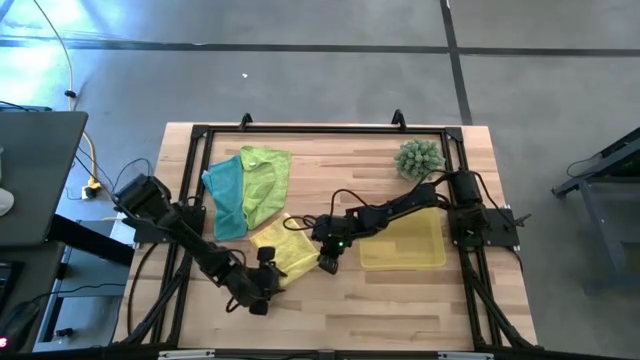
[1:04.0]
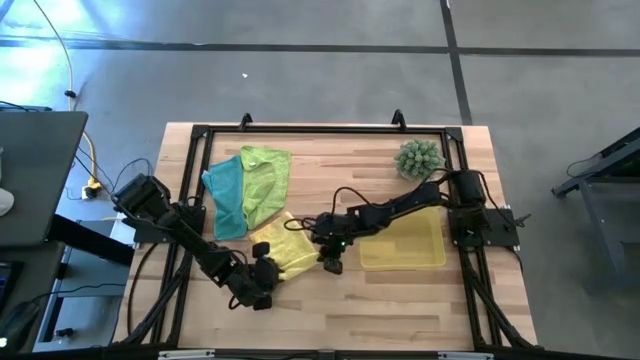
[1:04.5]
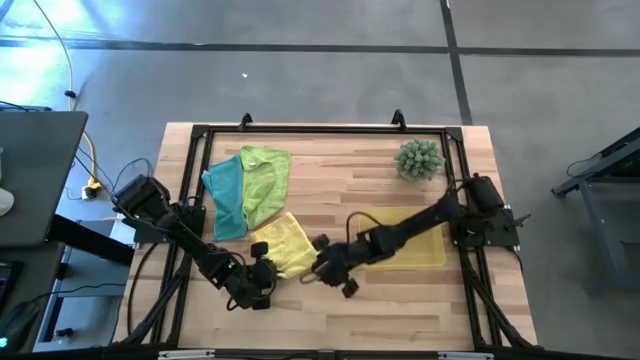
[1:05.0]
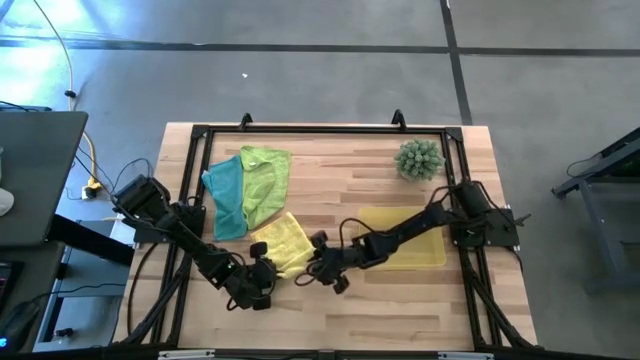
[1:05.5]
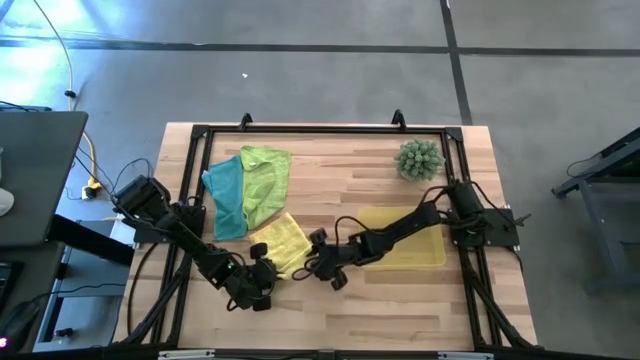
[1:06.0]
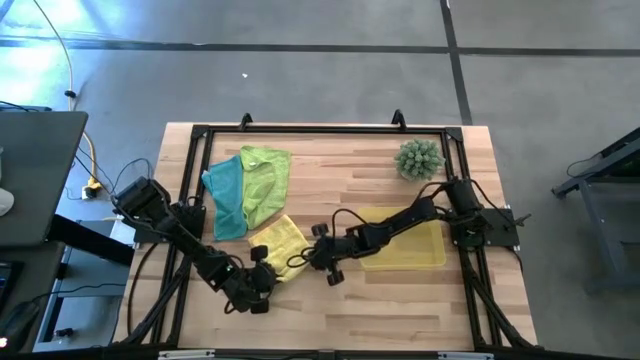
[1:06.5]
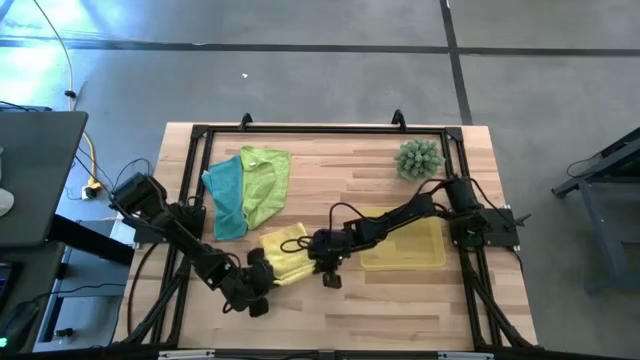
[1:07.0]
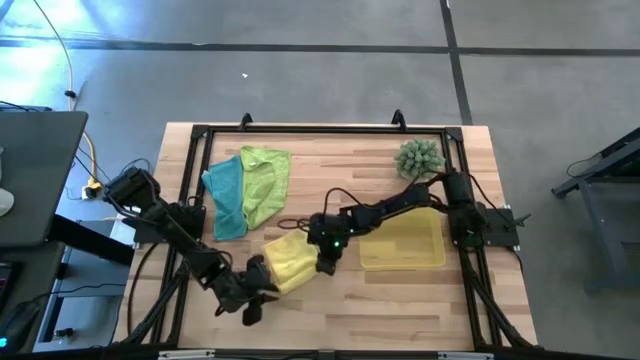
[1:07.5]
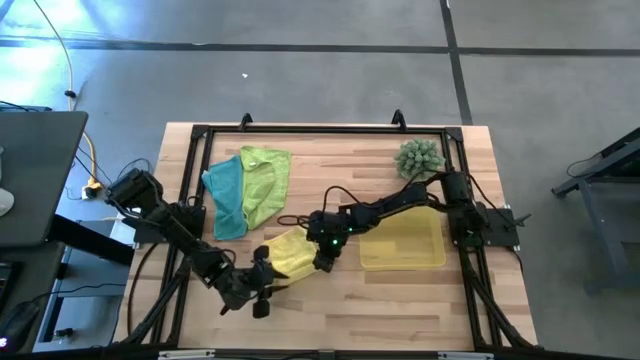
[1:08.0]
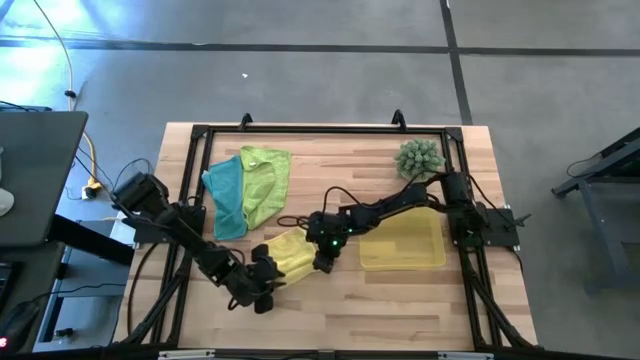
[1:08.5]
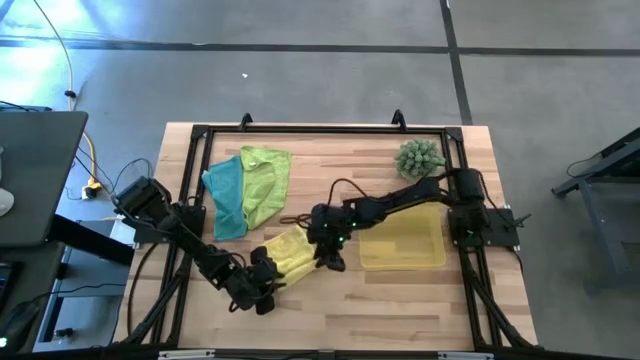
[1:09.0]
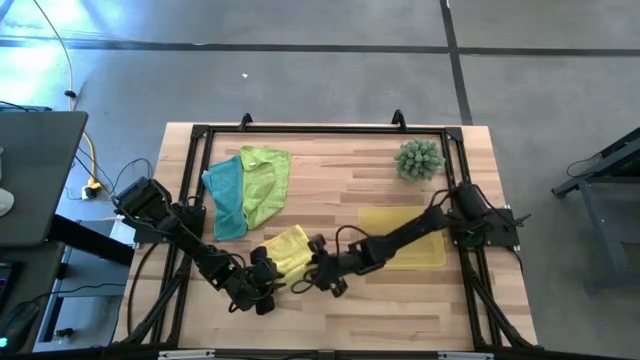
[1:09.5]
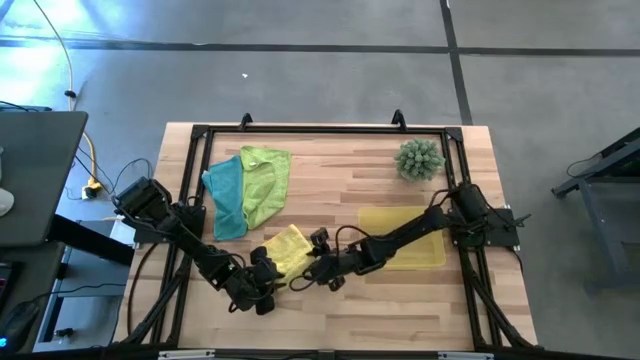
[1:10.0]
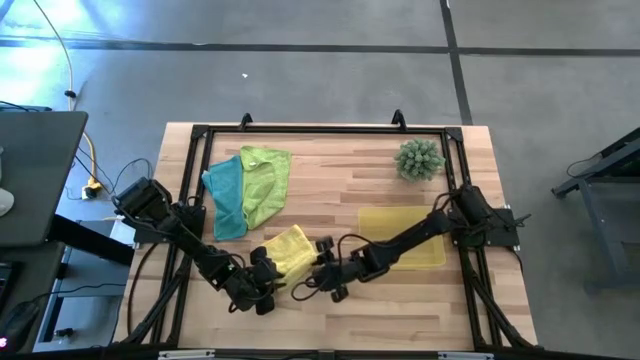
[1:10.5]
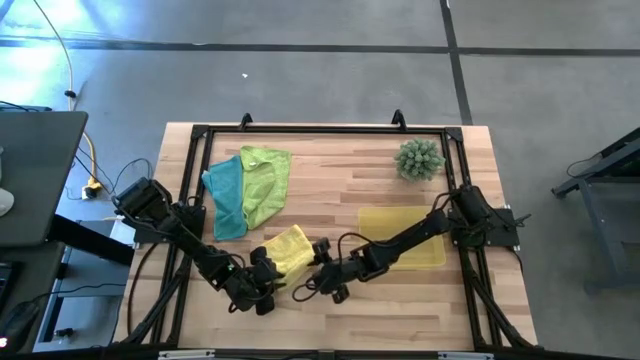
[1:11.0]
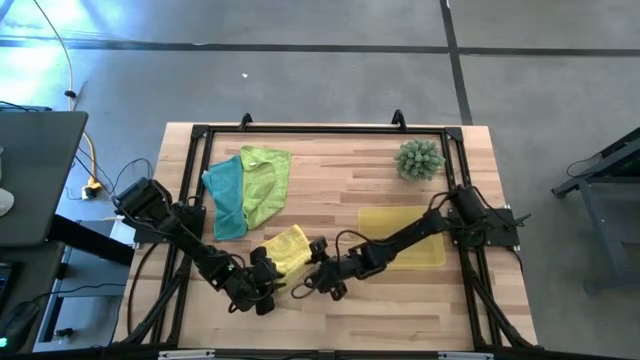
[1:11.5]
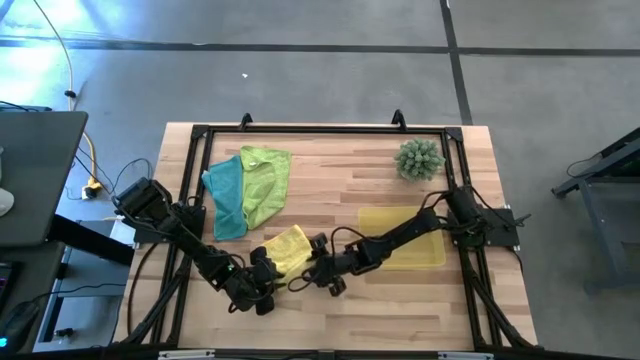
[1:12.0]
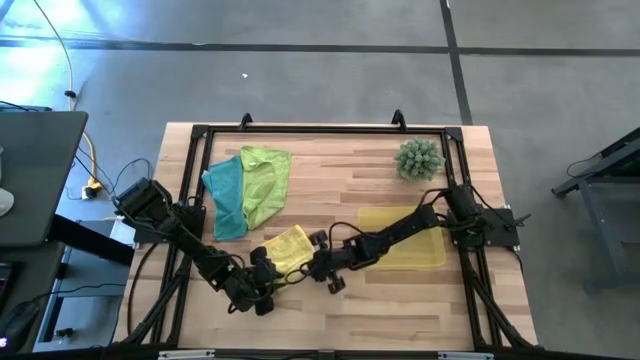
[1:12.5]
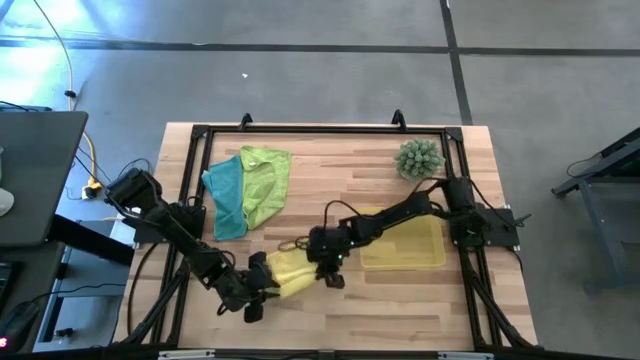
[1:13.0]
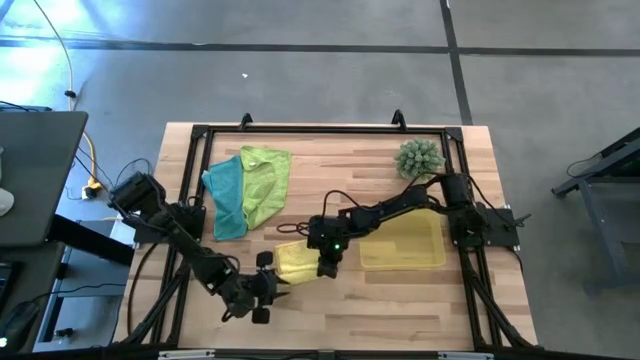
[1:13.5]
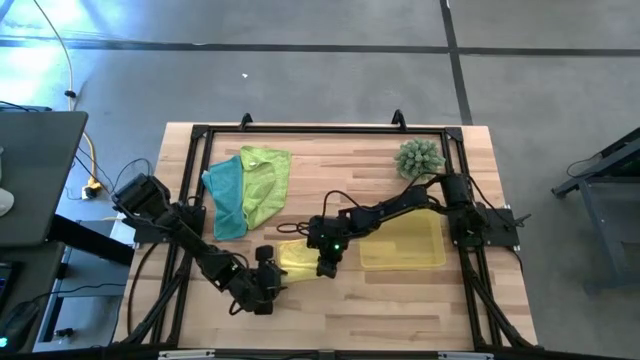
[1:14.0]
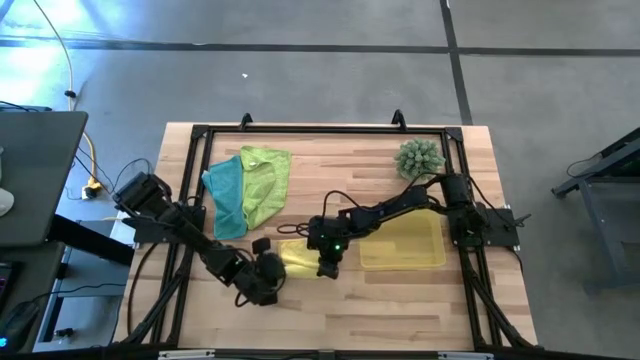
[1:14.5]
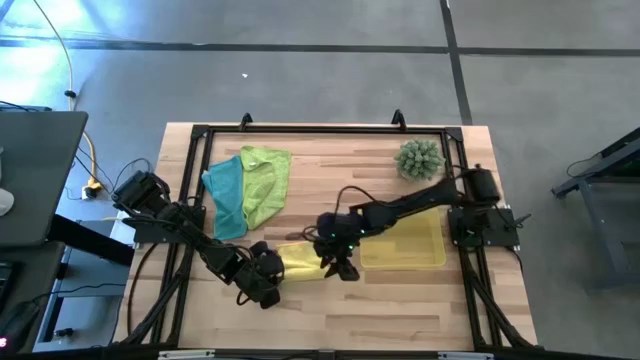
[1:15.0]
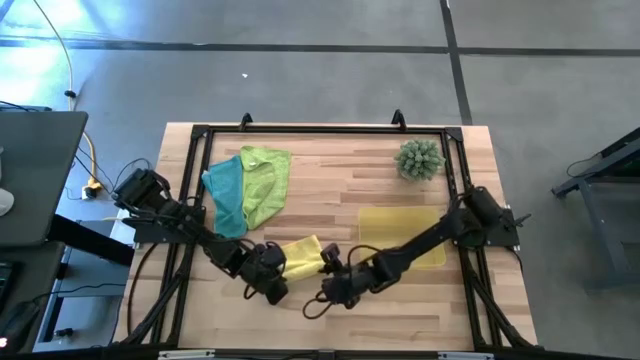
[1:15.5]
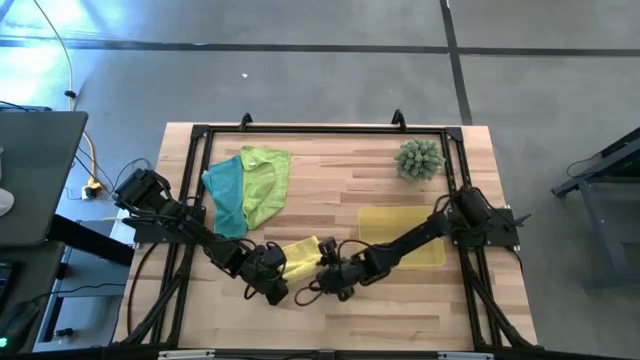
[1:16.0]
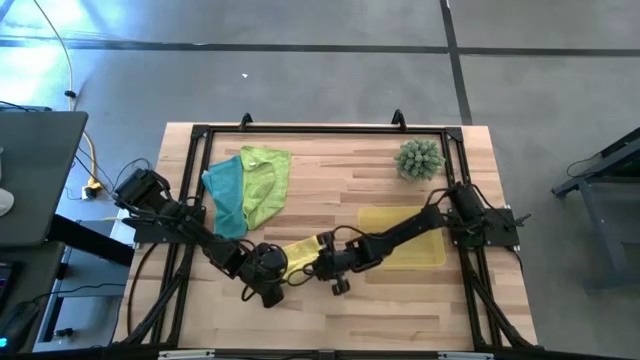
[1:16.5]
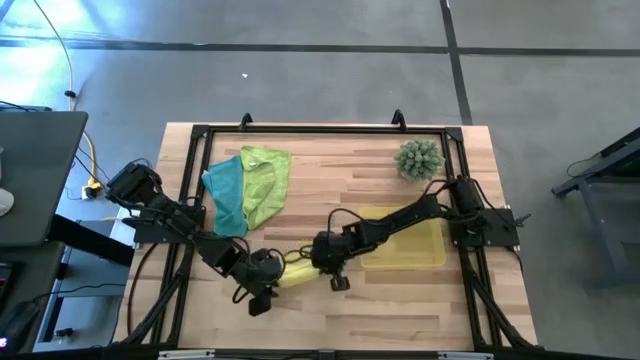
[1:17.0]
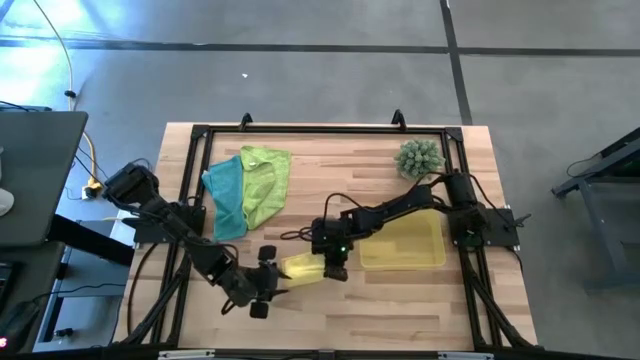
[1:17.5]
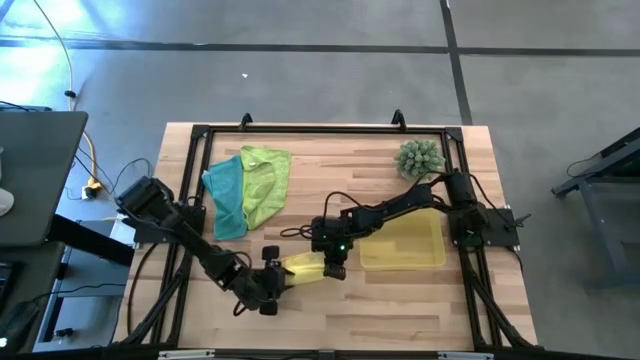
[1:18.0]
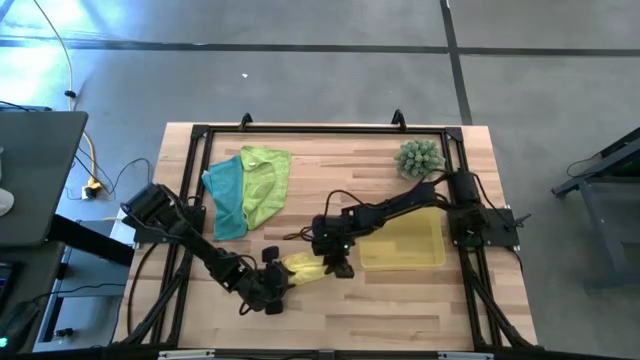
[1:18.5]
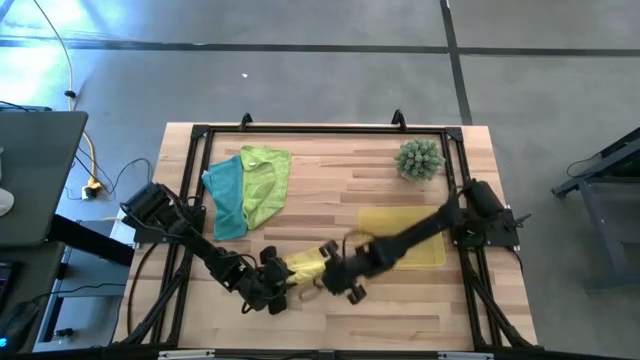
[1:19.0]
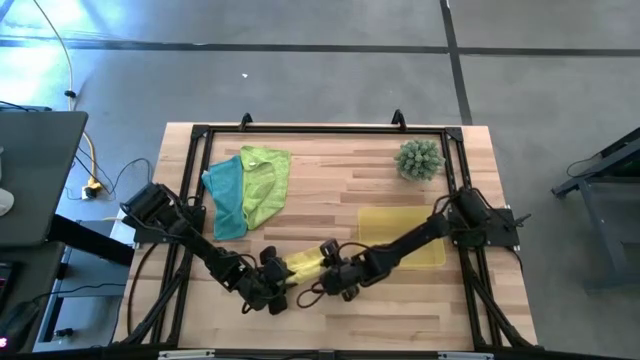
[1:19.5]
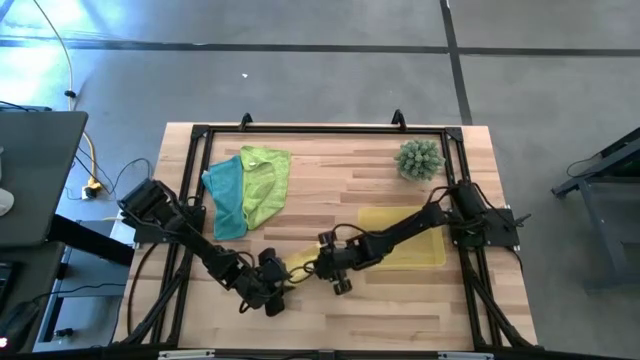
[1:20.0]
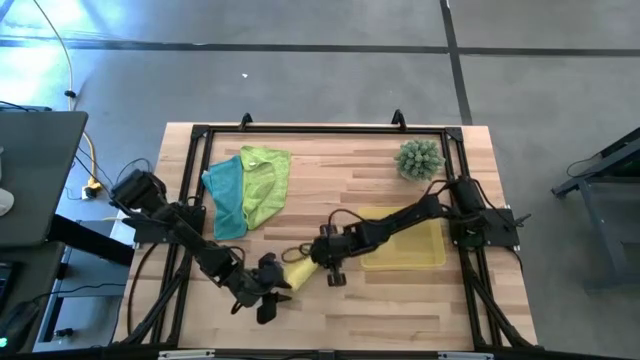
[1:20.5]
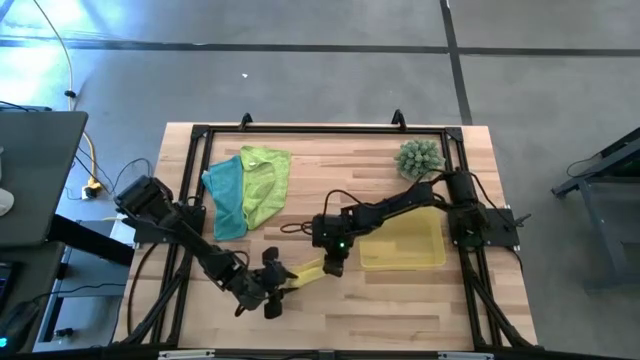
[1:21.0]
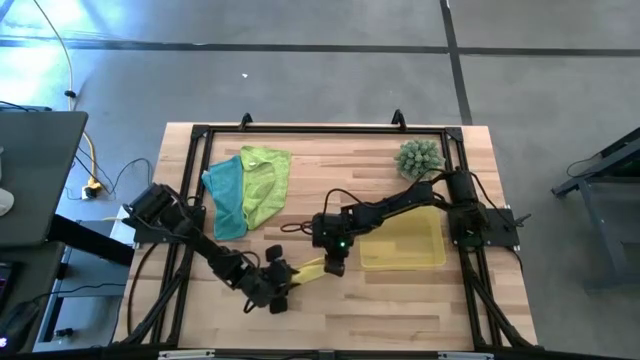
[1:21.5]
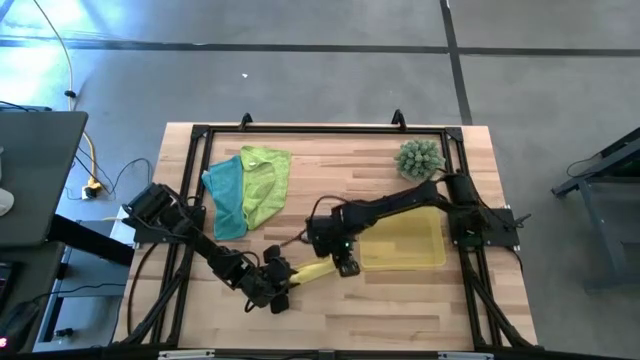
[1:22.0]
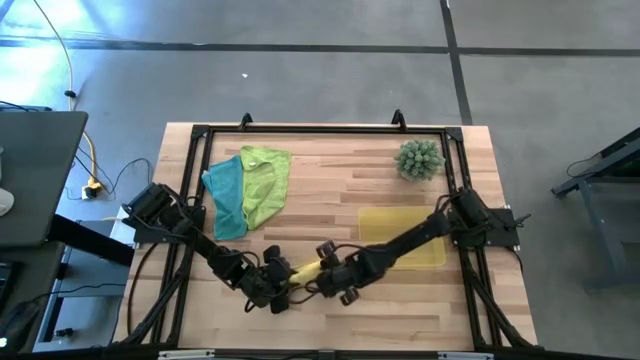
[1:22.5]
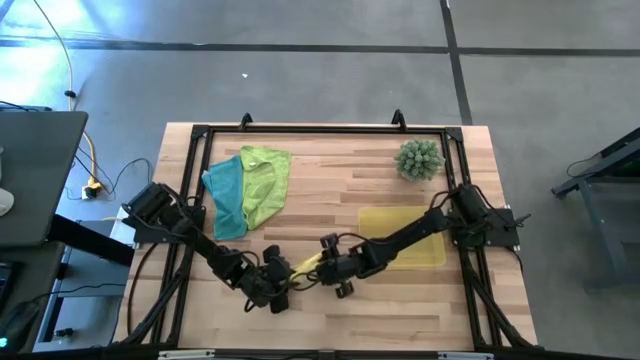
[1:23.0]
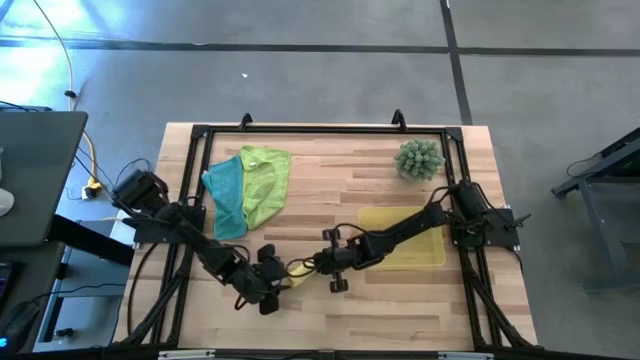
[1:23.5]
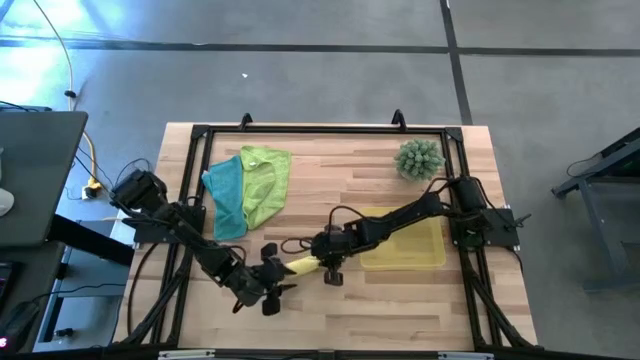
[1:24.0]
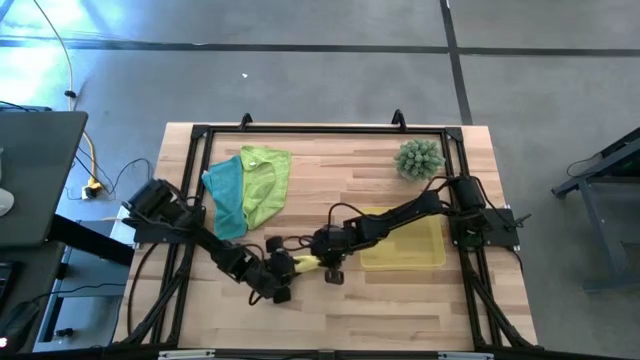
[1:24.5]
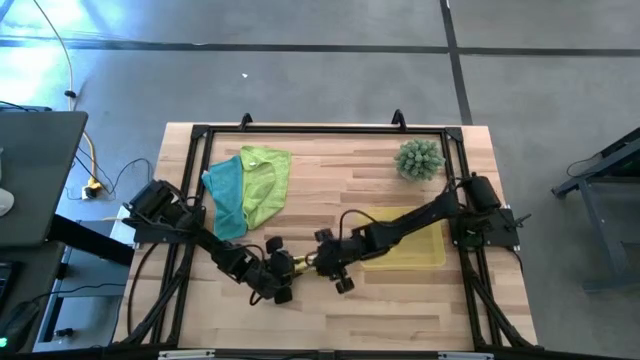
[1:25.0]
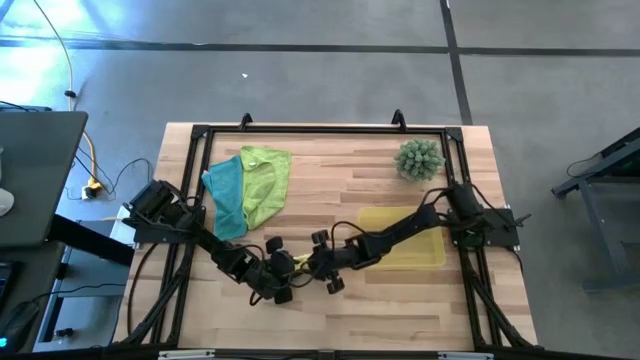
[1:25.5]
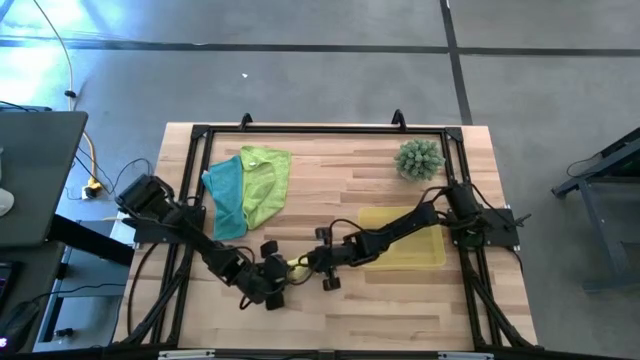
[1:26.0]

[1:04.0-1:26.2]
Task: Roll microfiber towels into tight, uniform cylinder then place into a basket
Roll the yellow microfiber towel
